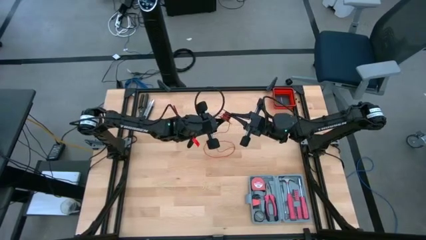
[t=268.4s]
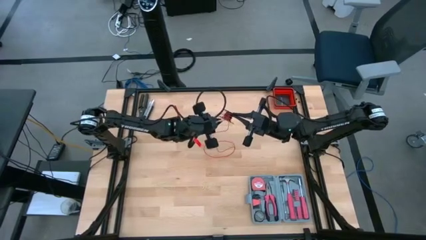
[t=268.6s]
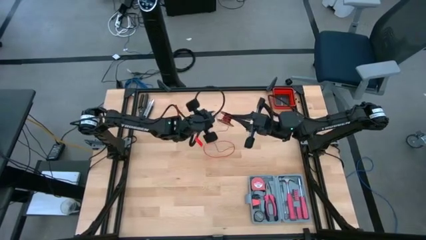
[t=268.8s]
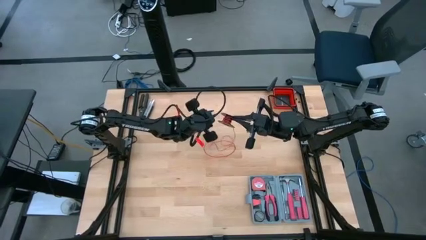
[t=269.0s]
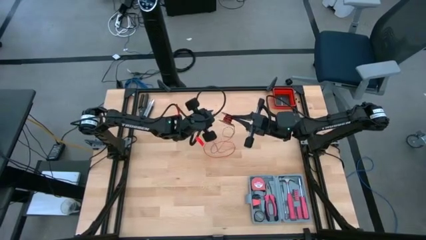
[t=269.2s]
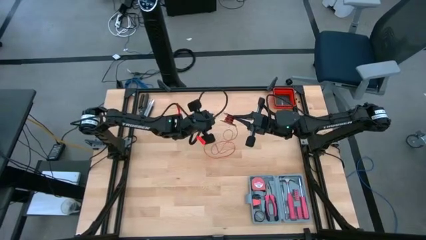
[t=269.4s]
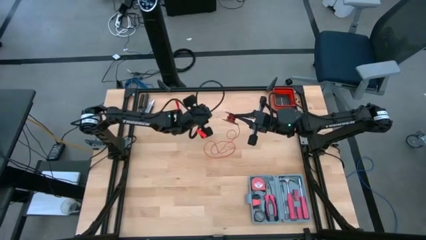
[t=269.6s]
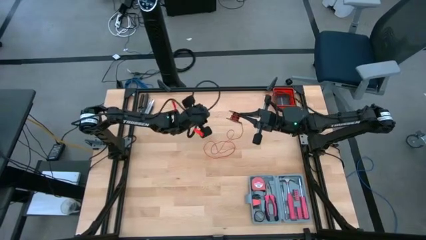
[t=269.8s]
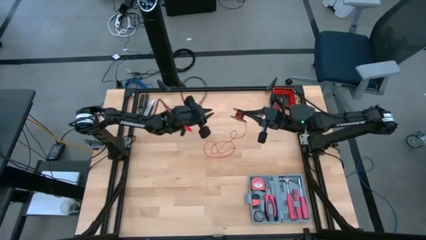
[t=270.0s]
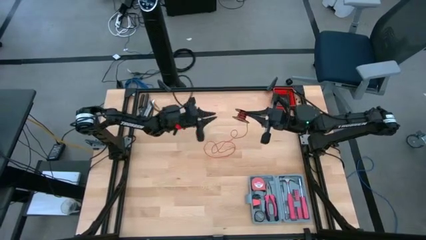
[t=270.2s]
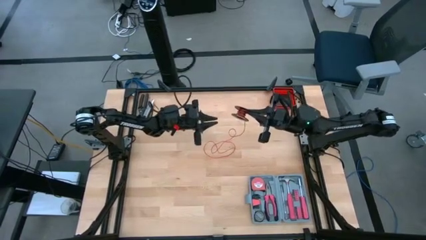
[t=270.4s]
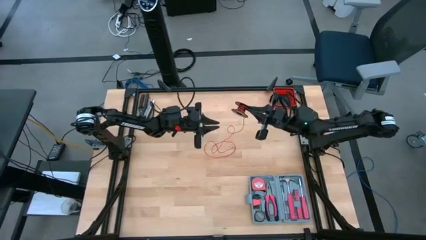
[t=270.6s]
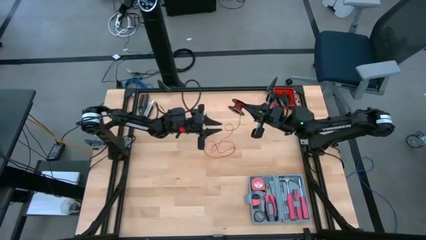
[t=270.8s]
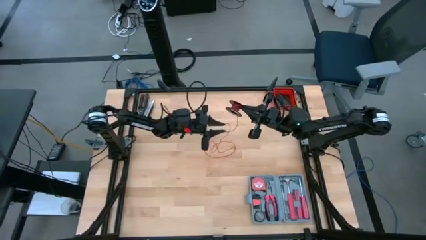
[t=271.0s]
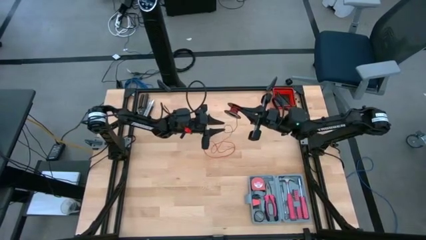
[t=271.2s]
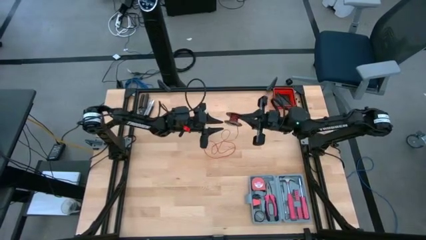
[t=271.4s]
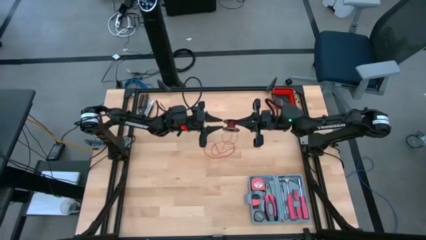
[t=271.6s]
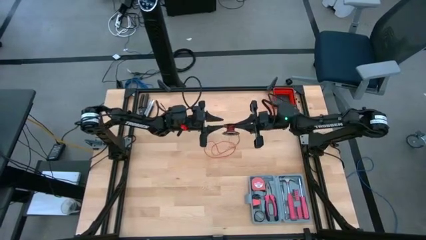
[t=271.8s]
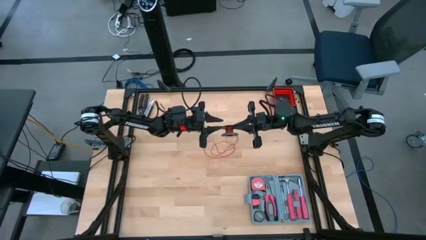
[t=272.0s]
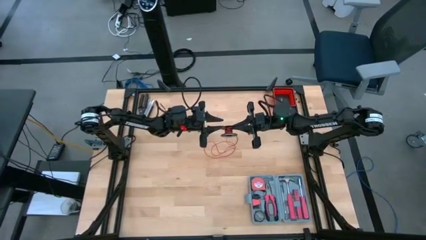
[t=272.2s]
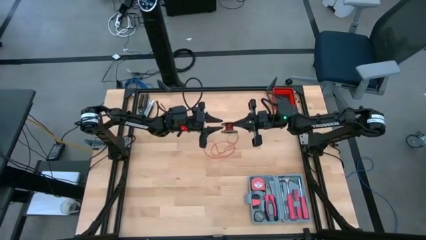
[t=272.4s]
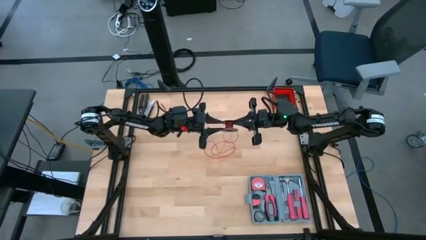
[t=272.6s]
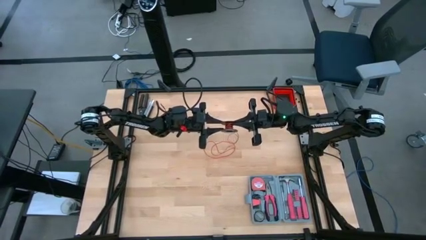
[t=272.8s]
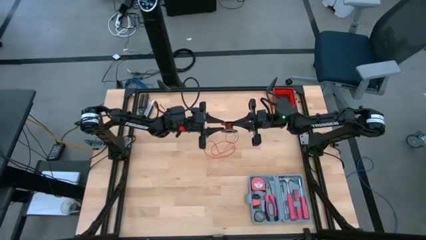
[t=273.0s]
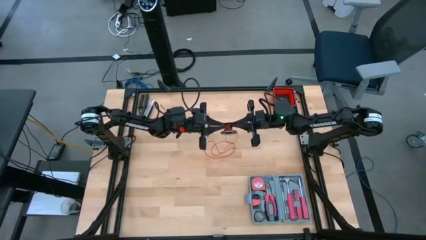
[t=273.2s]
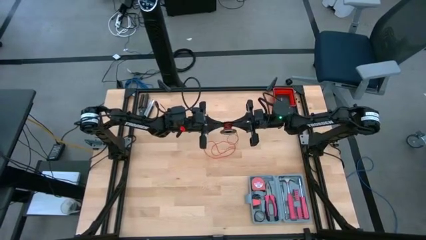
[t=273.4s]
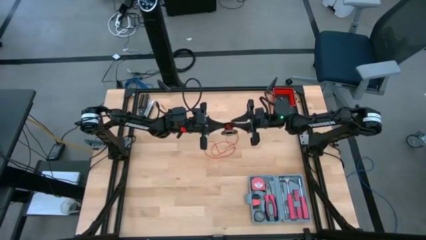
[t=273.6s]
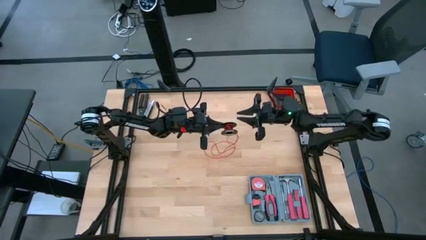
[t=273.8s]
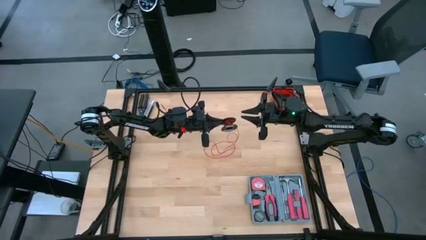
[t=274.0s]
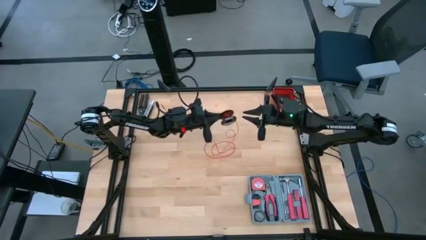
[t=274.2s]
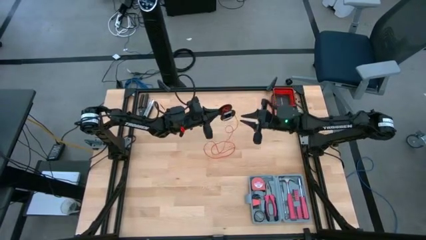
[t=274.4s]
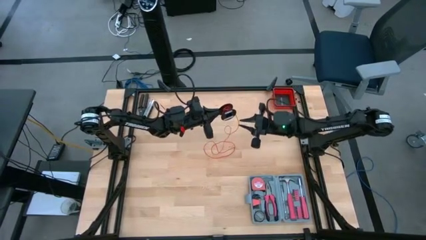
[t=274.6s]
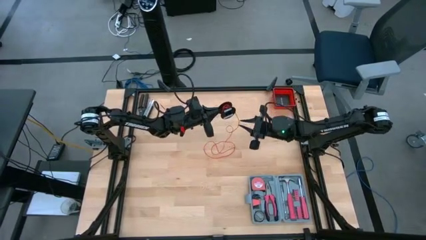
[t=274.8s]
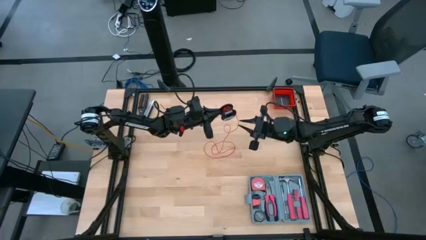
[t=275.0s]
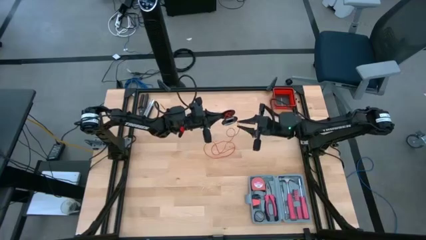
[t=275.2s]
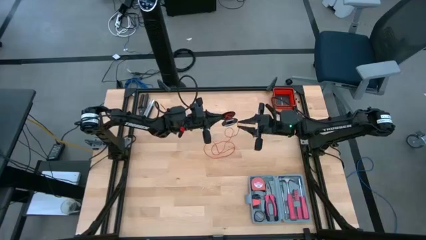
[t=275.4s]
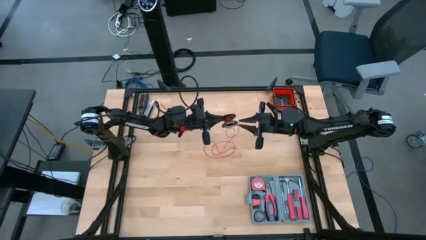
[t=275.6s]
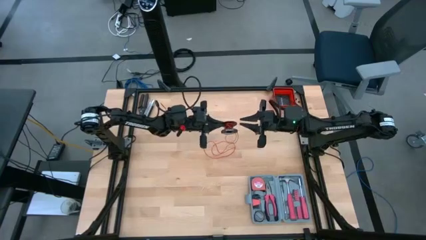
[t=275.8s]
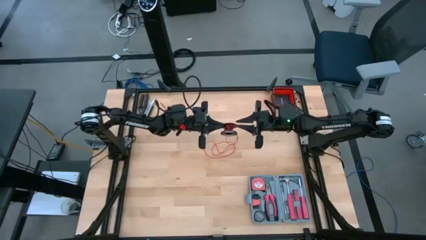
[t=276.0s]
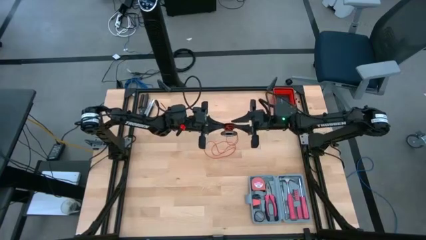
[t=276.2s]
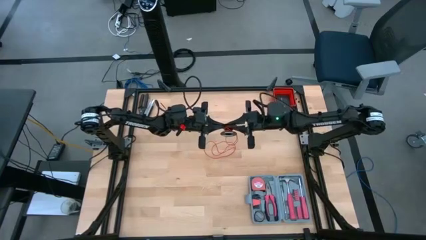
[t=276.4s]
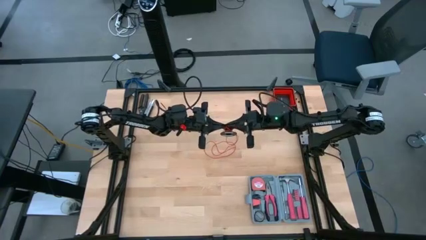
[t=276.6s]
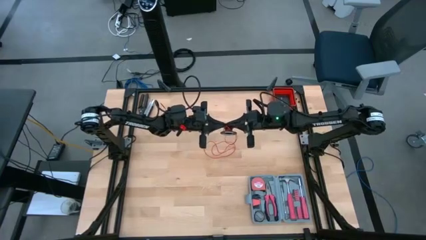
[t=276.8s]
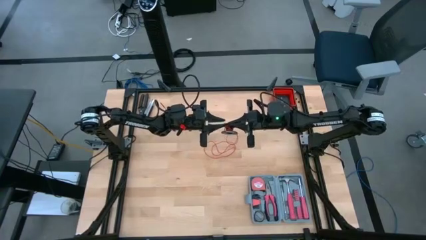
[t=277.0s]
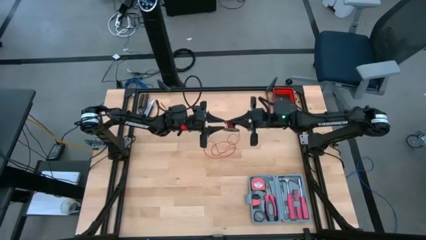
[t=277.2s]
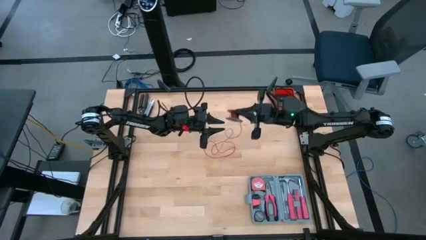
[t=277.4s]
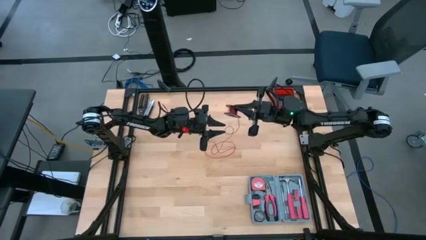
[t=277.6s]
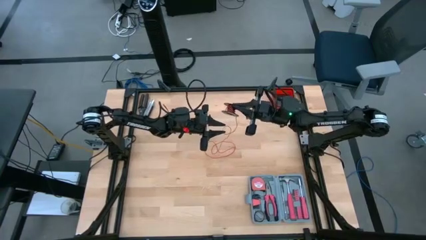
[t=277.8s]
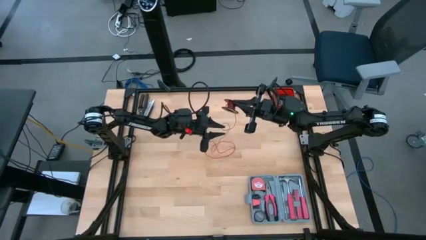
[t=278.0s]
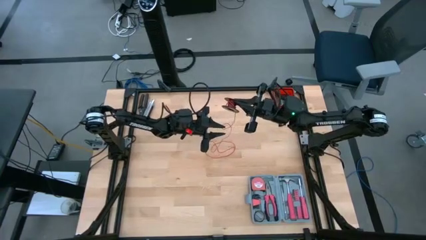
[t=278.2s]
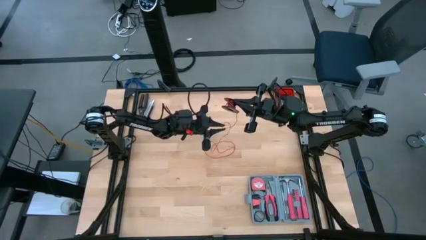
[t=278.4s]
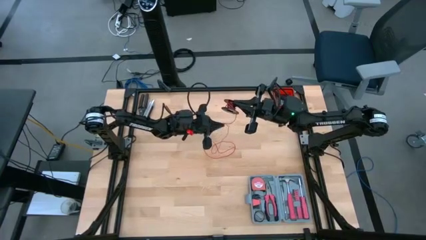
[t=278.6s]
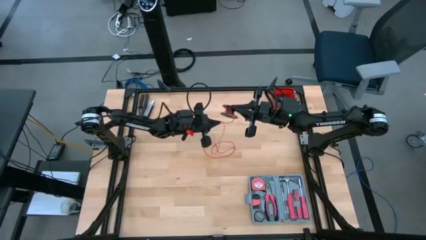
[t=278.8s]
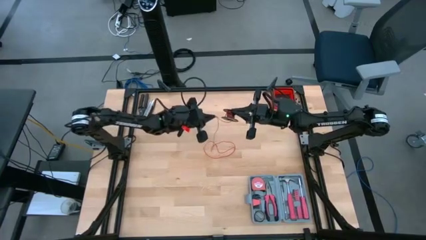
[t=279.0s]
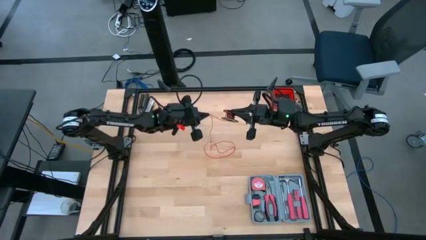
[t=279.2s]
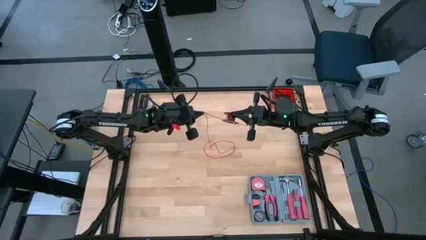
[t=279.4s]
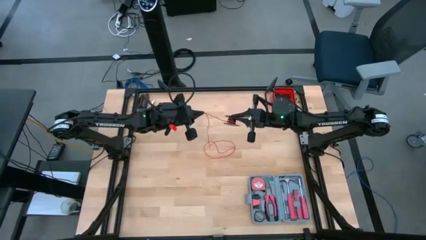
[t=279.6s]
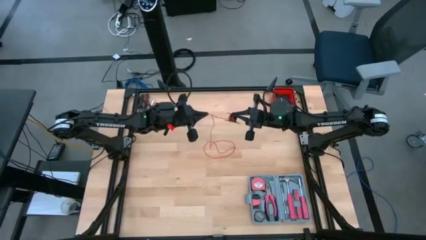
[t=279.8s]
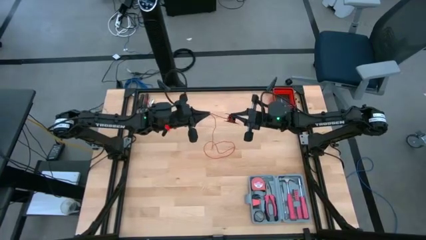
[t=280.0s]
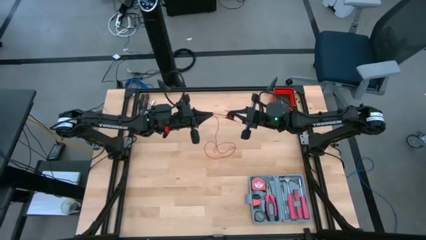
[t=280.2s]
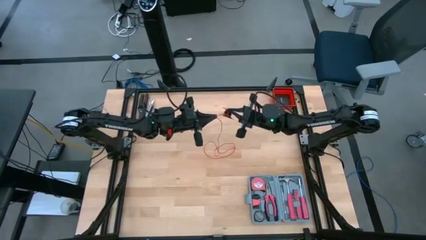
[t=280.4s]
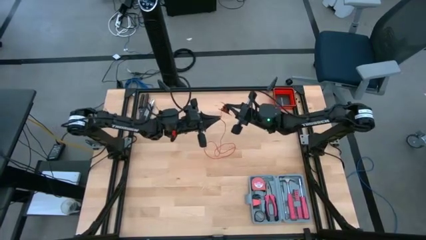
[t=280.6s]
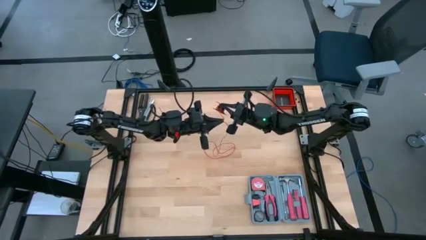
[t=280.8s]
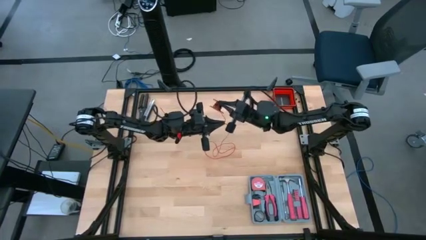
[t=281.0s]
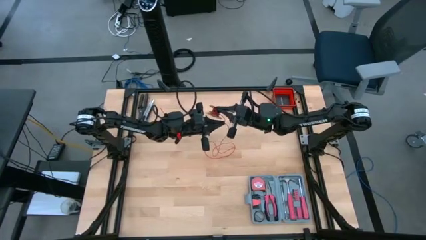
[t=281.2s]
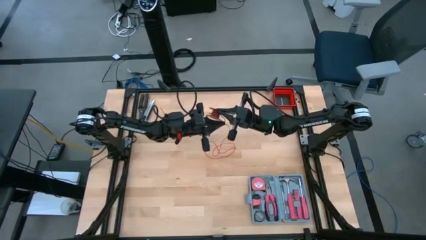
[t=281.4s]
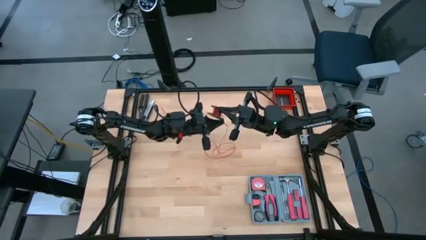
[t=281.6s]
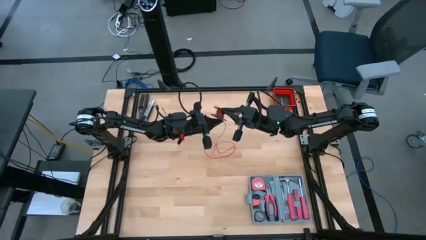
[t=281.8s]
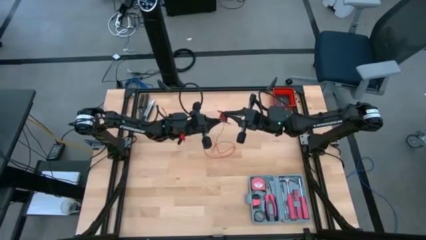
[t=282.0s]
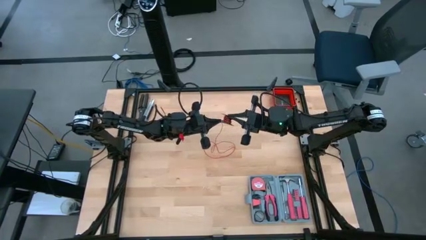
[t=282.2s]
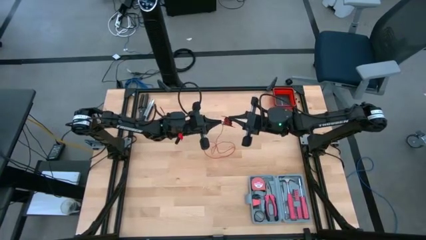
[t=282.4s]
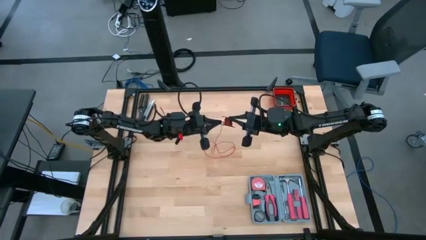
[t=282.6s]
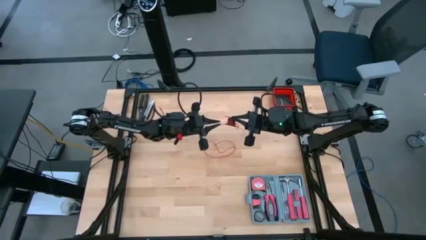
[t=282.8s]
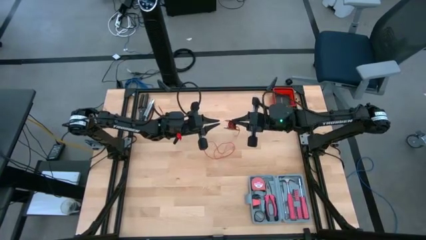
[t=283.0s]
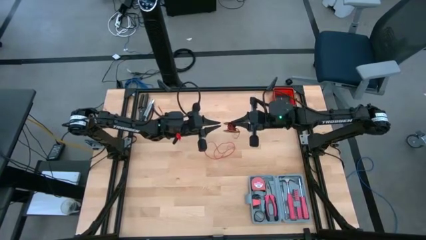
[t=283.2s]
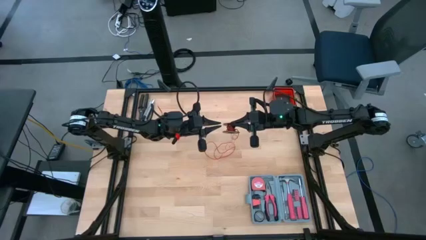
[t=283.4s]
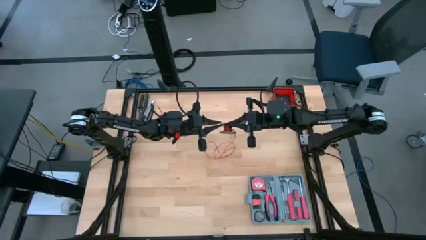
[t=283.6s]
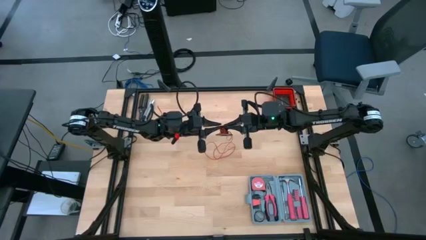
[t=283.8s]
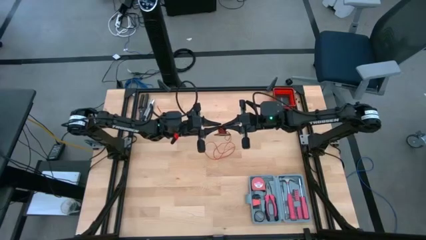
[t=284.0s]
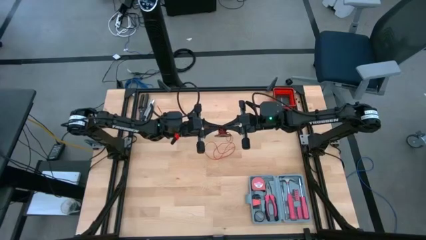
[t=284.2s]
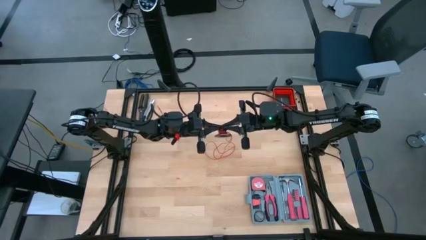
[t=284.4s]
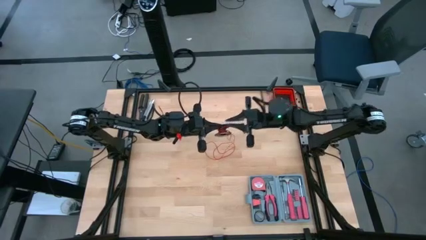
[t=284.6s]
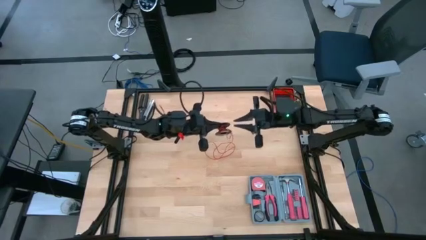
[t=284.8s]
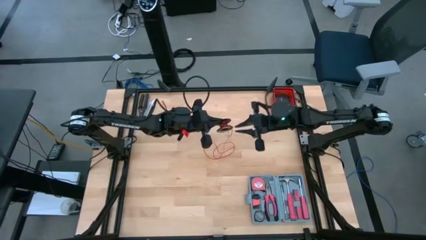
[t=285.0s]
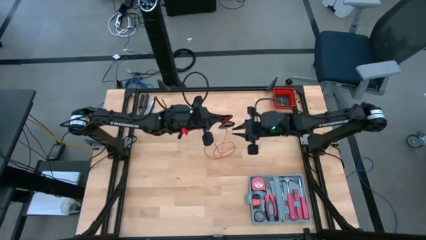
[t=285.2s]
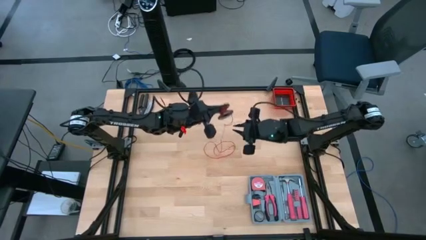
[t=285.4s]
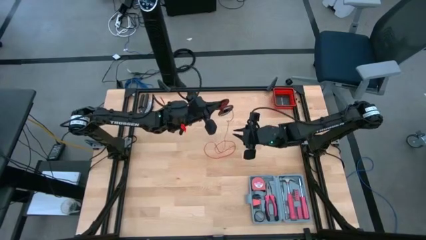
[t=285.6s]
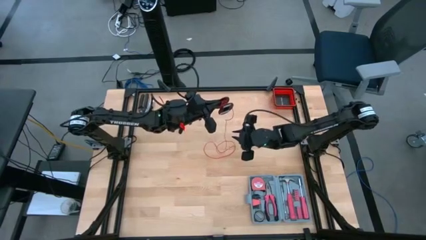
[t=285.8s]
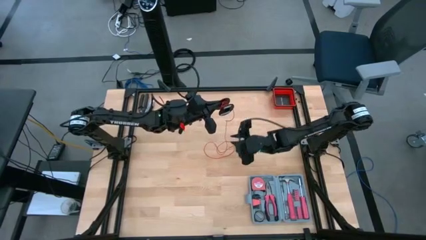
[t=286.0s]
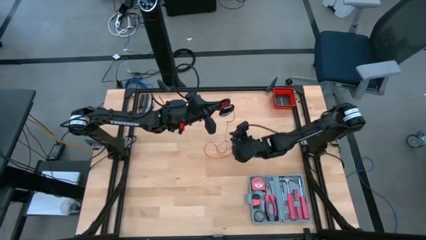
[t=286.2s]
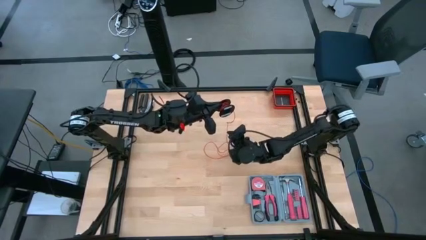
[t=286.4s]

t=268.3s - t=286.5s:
Task: Coil cords
Coil the wire
